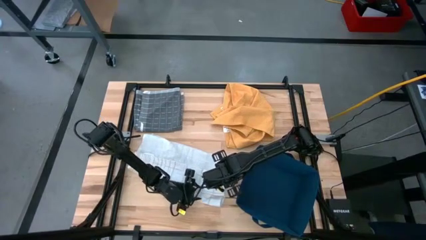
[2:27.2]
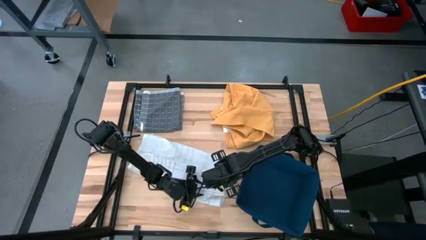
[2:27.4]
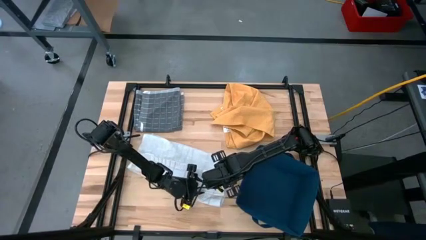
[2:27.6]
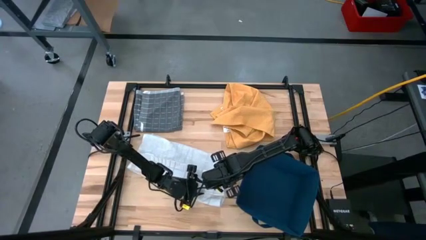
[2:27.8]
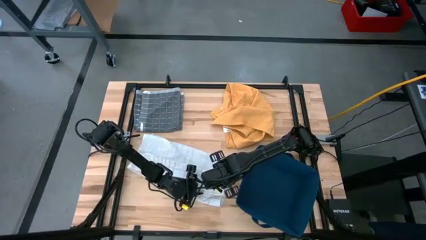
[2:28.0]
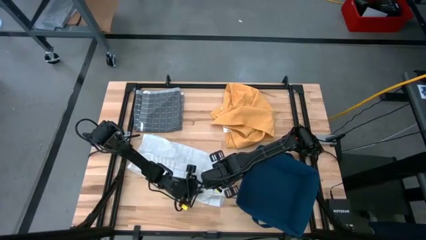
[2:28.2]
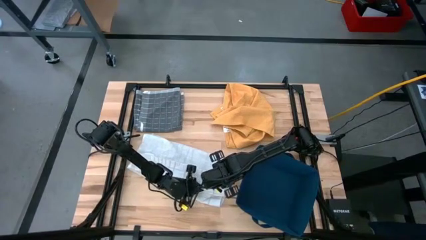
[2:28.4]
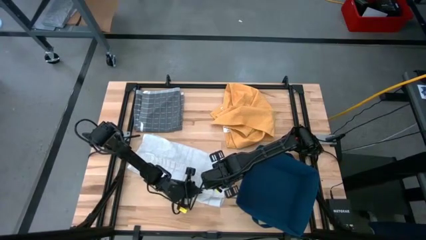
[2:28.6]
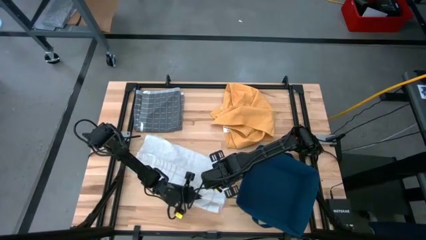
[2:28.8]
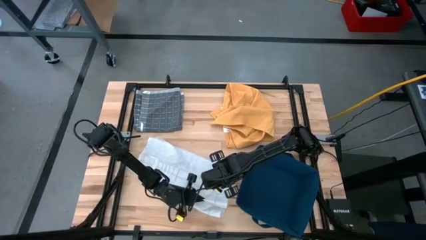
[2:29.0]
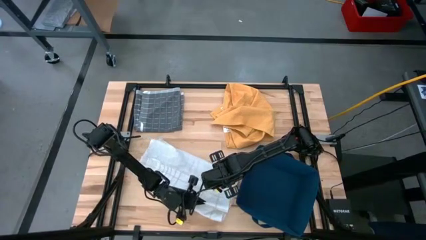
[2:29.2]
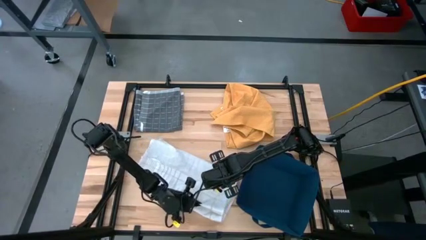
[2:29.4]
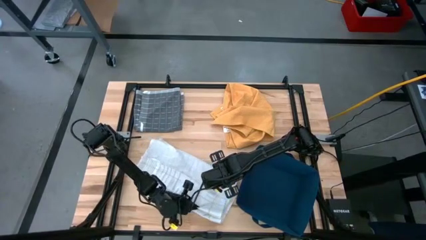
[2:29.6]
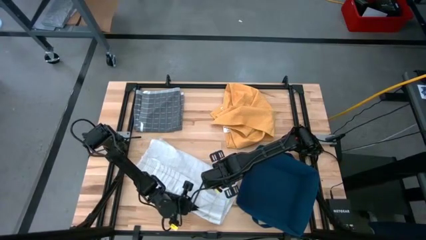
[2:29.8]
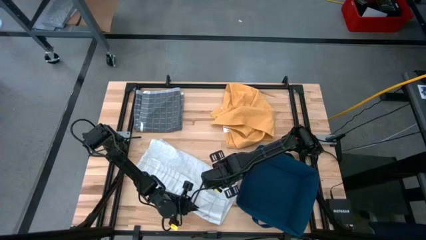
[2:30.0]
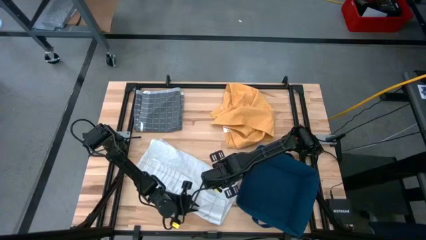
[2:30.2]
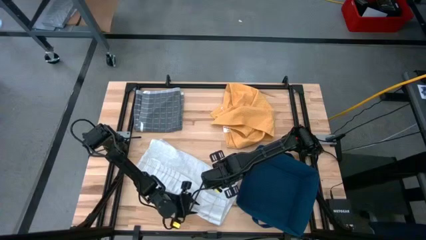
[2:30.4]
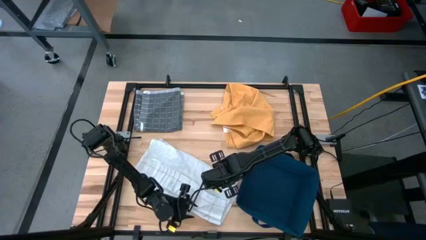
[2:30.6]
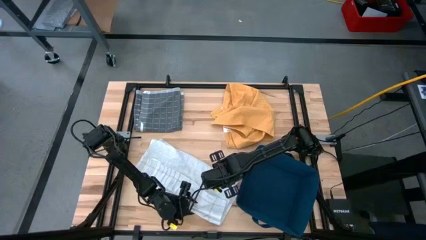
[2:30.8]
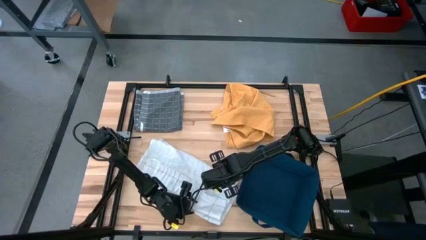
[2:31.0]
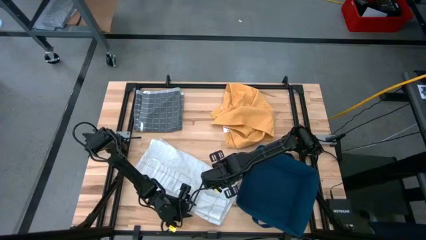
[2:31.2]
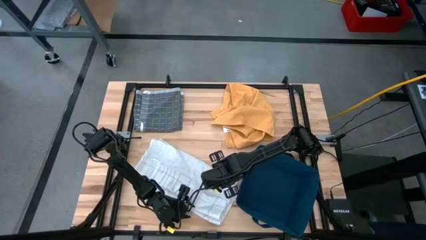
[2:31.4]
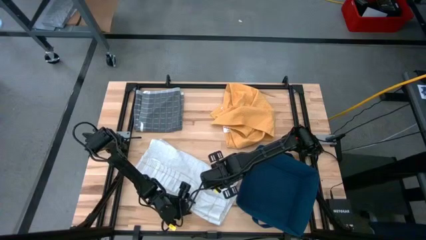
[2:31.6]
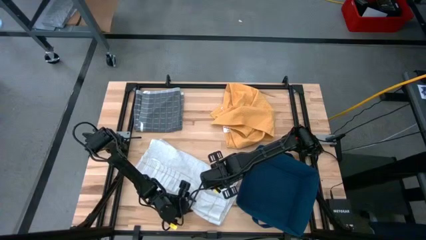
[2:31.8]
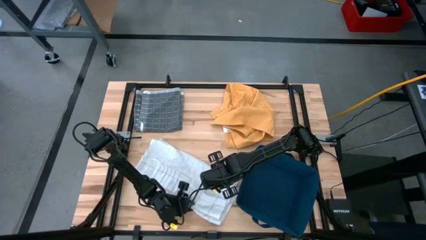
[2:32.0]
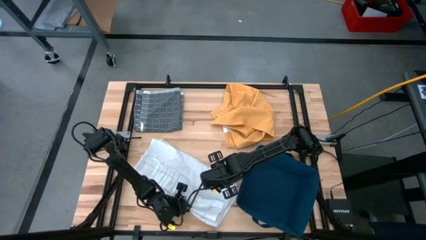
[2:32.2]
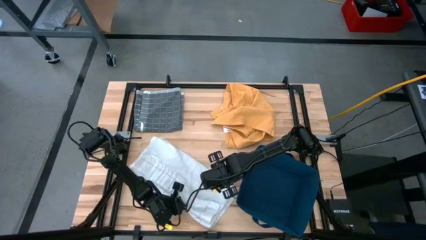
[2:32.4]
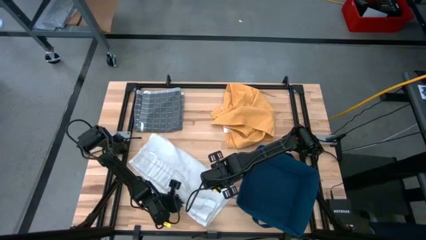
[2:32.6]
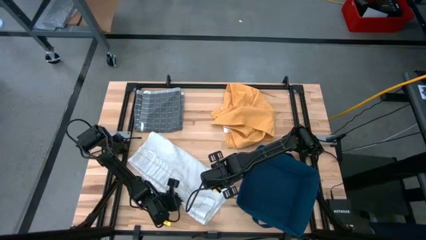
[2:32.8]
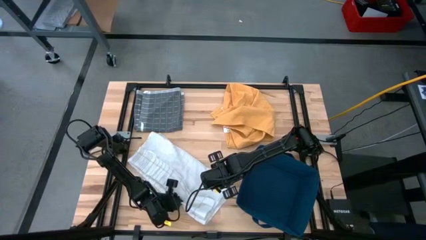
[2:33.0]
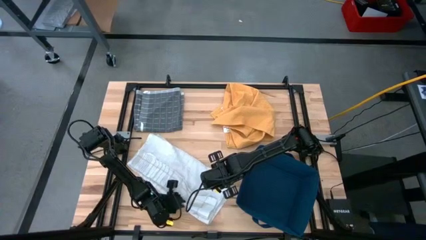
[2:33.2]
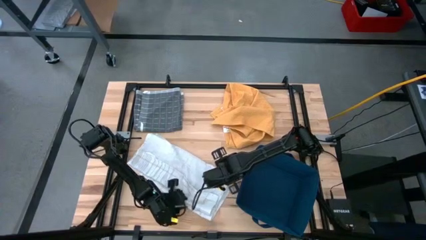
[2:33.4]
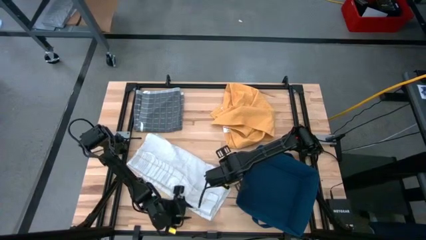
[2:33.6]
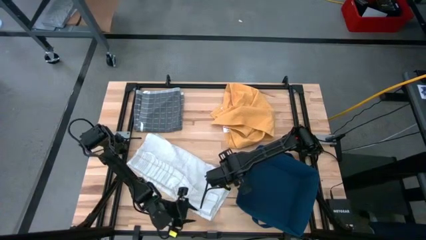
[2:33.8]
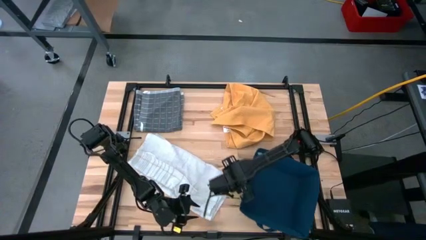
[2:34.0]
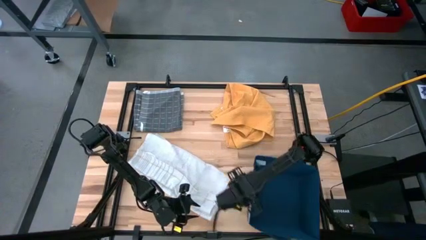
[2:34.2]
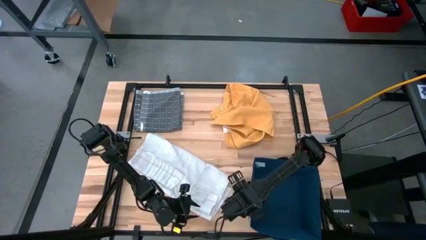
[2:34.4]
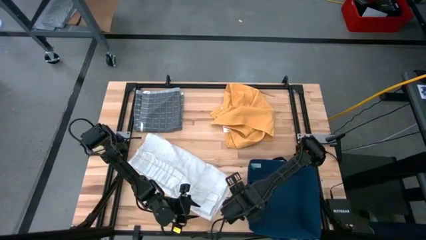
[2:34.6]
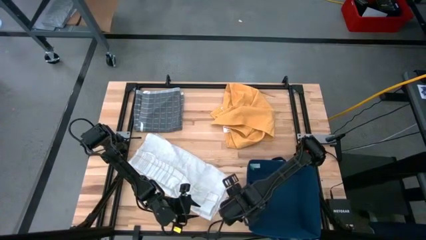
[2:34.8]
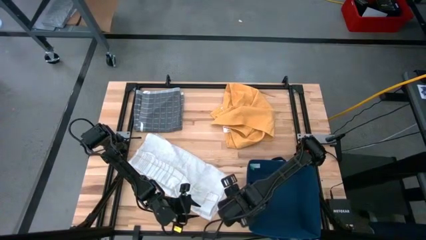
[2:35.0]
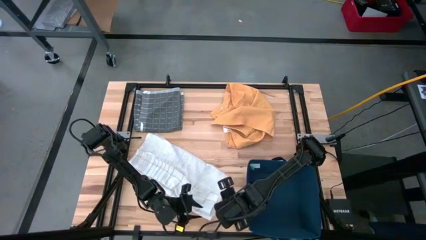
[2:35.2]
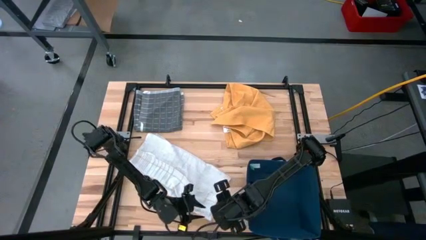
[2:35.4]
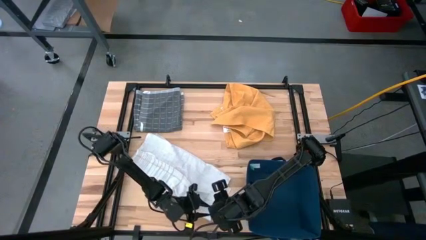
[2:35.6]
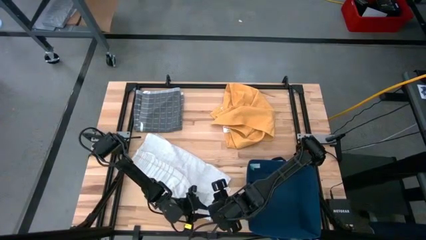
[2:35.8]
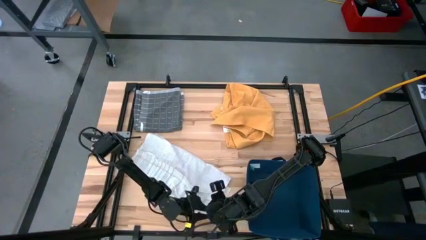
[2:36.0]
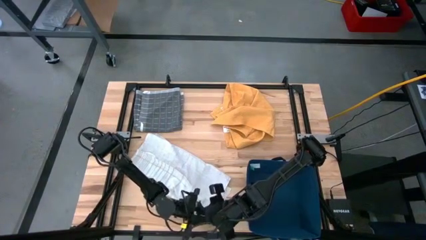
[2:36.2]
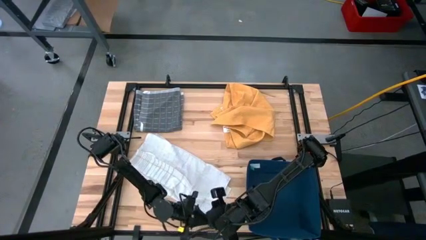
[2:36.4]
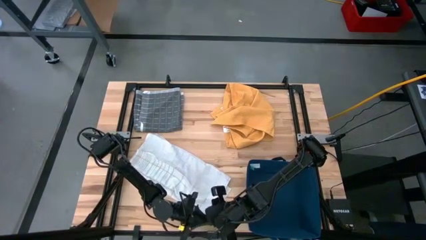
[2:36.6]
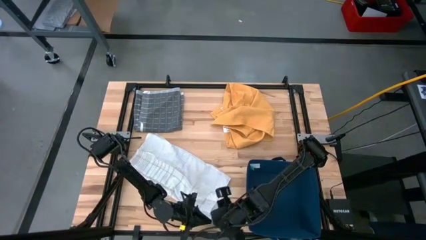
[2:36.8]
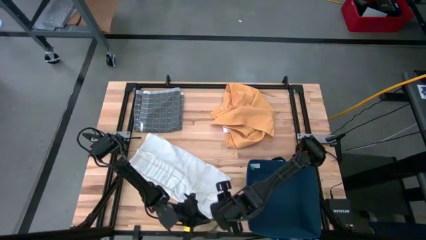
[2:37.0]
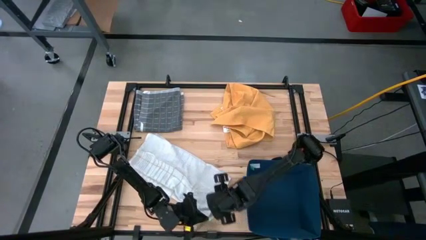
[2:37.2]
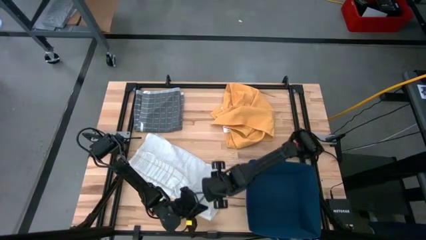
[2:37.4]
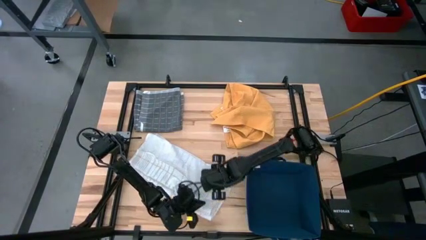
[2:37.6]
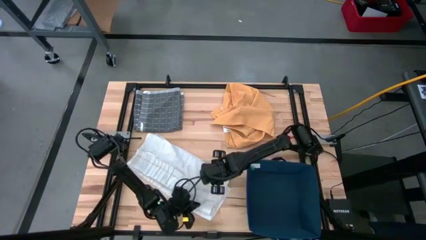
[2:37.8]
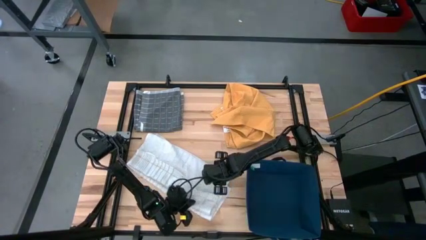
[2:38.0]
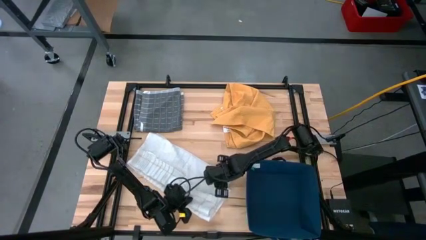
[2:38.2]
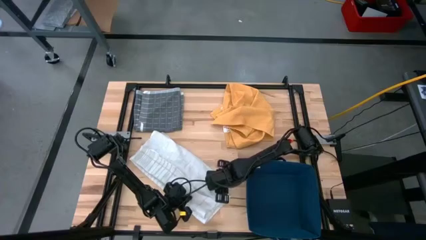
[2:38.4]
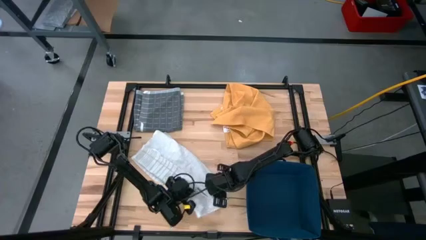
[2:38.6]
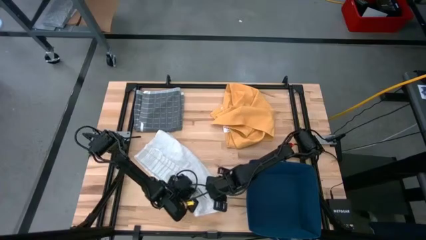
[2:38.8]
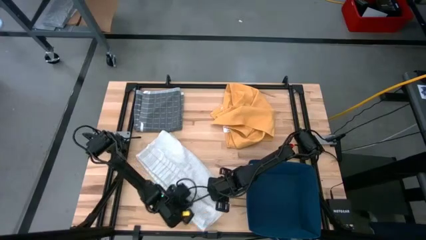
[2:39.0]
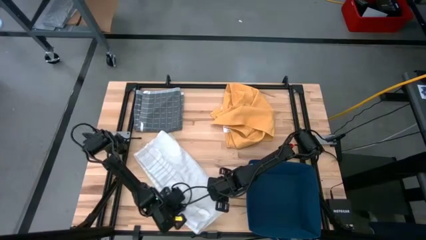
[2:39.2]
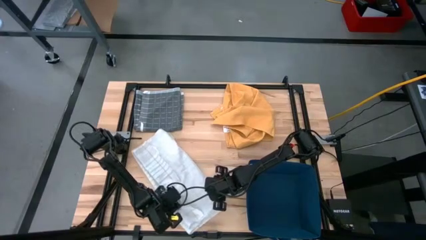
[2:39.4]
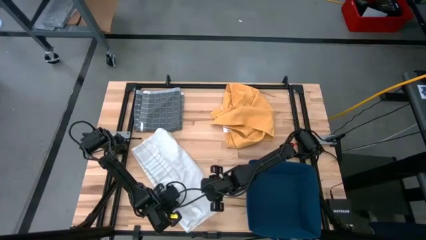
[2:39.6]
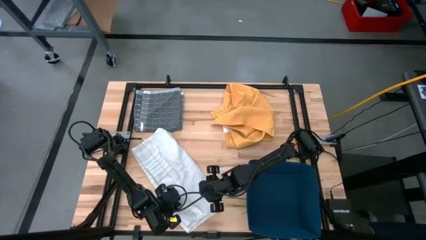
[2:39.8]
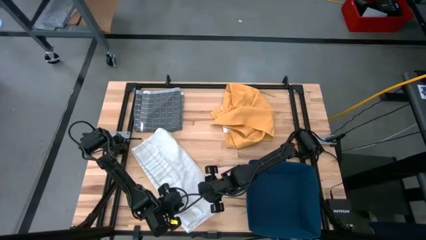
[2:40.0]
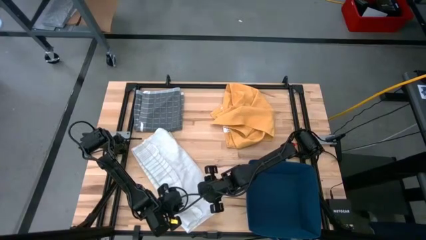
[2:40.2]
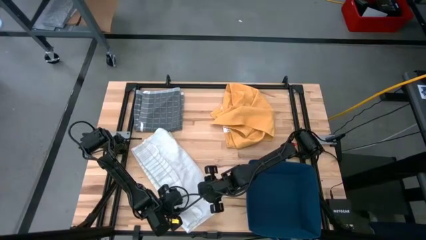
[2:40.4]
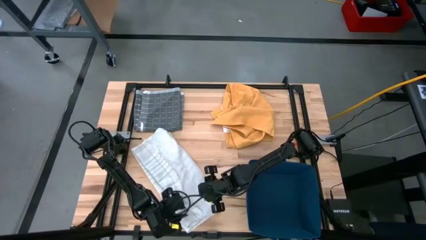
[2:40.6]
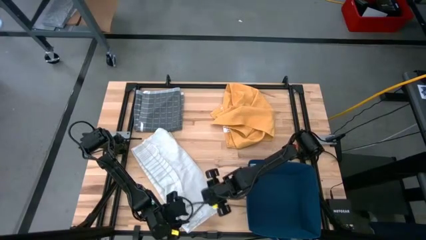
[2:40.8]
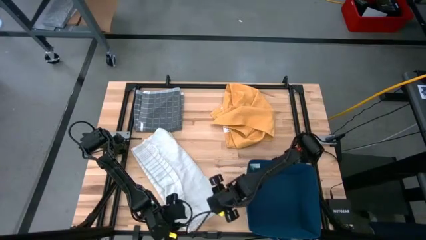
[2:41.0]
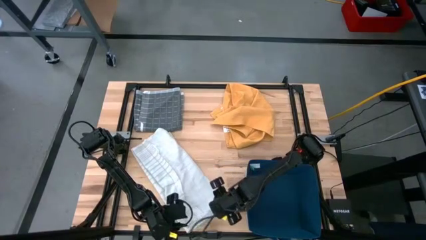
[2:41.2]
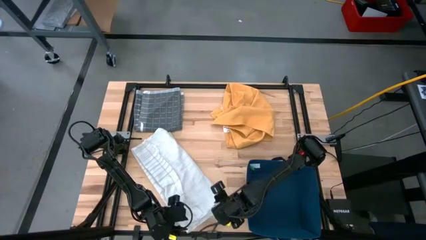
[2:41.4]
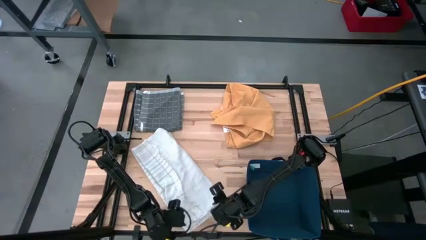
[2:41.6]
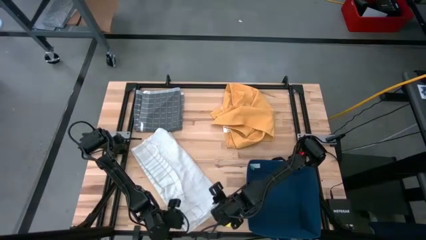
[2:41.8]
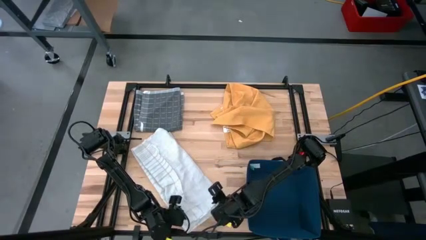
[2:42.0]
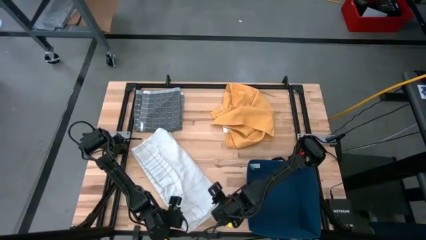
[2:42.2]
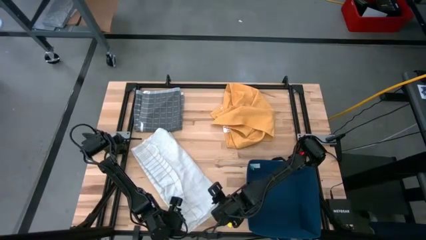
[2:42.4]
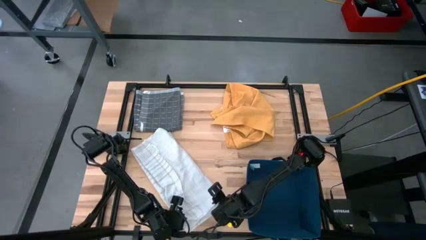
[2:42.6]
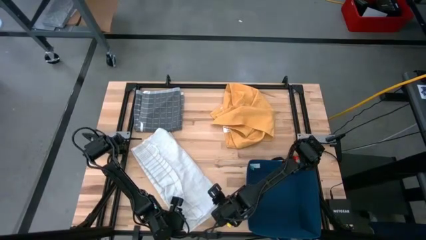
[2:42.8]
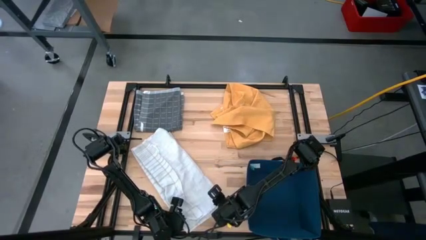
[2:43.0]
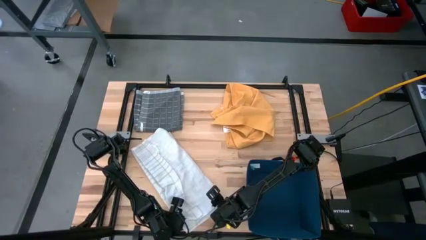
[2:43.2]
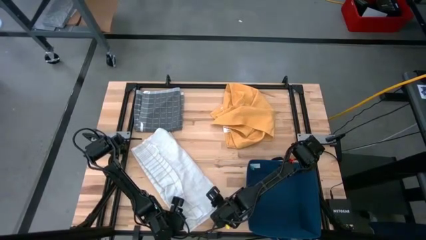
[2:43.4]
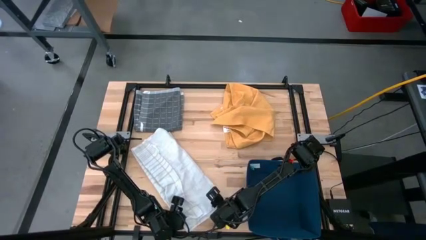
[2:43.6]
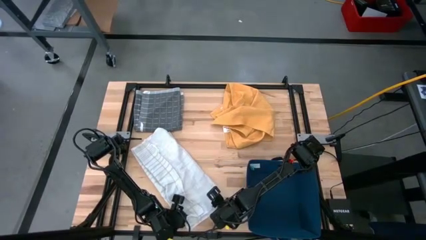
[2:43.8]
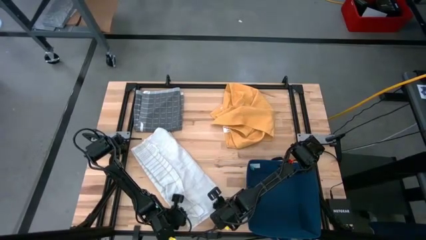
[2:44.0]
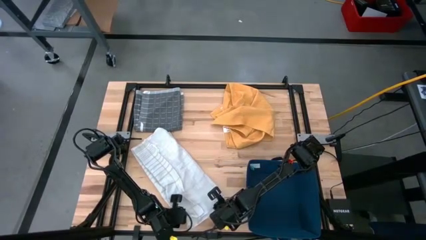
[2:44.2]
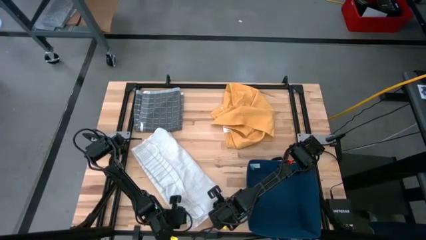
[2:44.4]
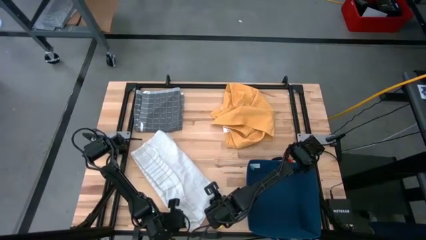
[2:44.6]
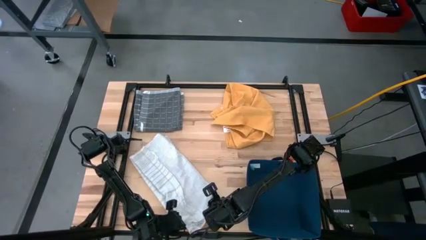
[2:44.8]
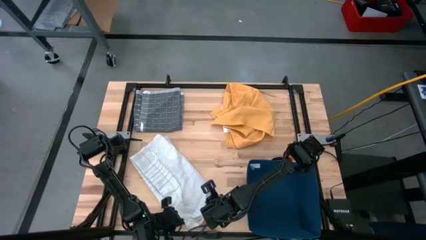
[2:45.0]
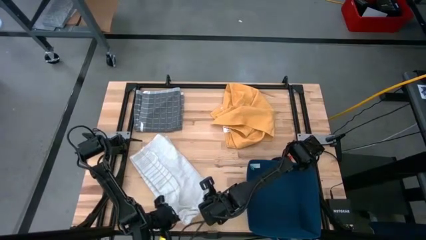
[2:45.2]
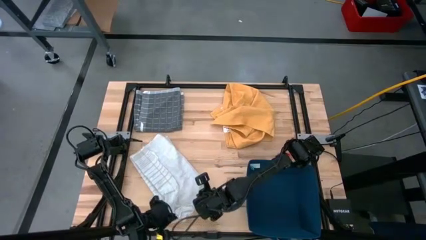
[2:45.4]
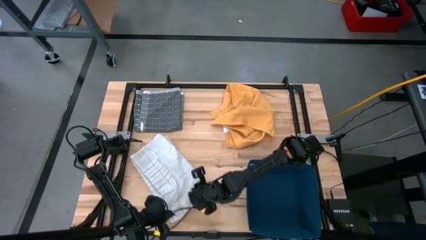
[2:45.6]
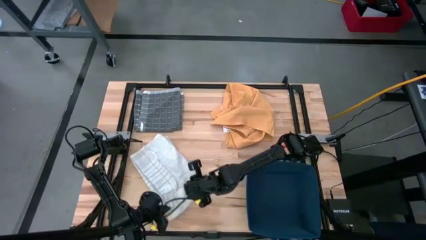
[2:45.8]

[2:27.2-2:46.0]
Task: Fold towel
Fold the white towel
